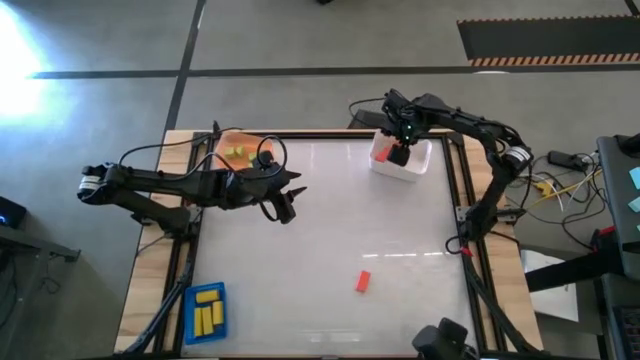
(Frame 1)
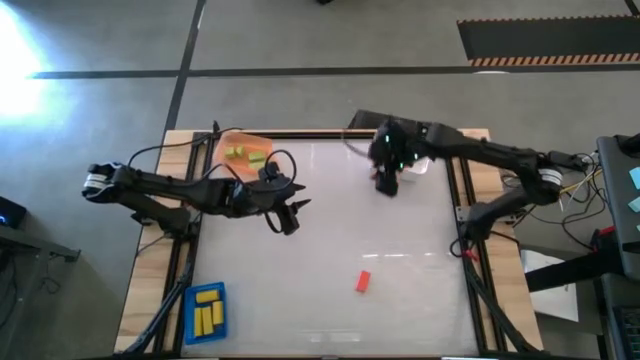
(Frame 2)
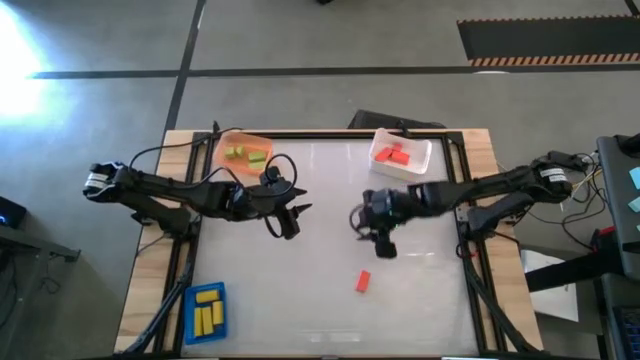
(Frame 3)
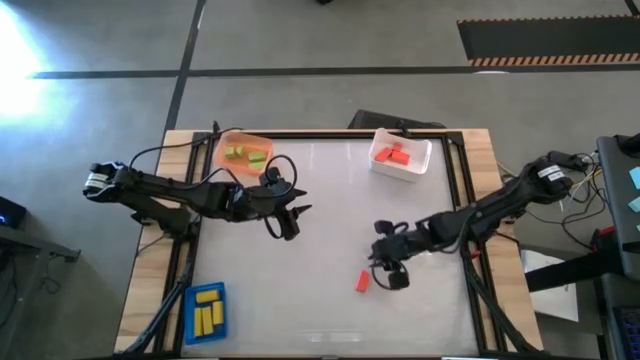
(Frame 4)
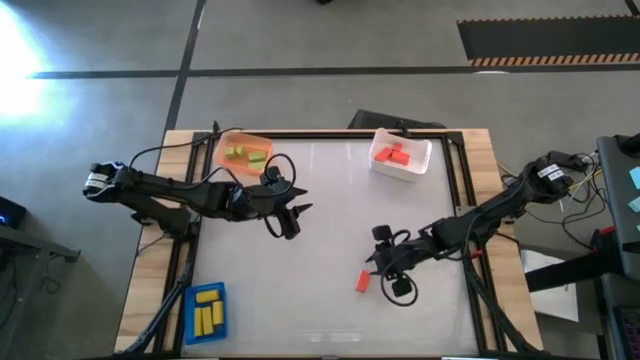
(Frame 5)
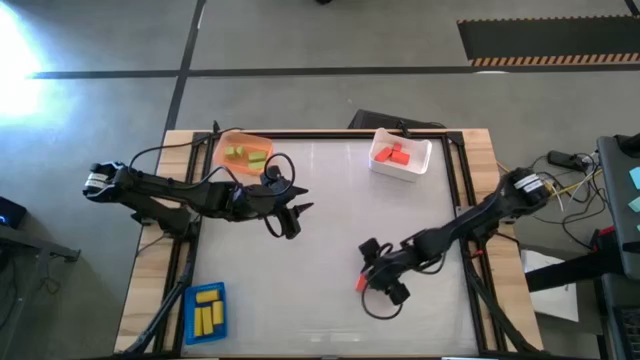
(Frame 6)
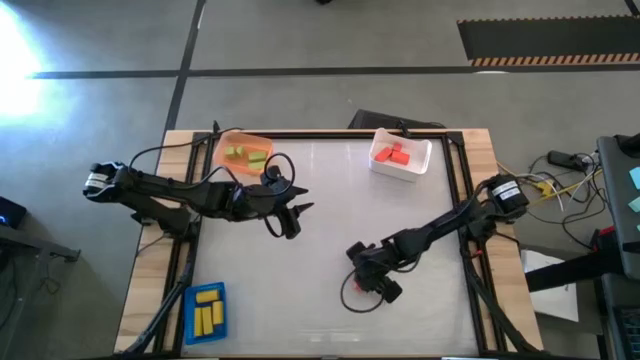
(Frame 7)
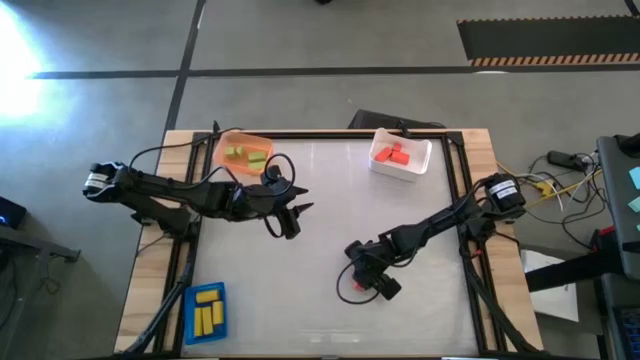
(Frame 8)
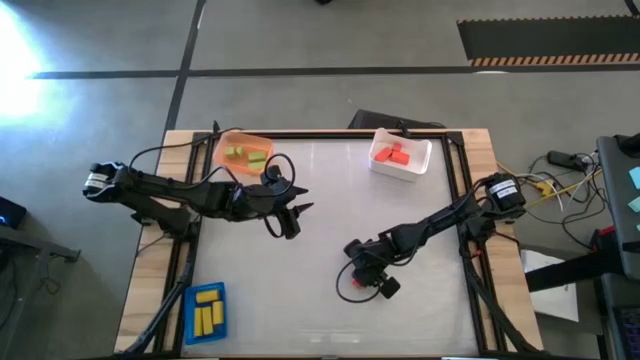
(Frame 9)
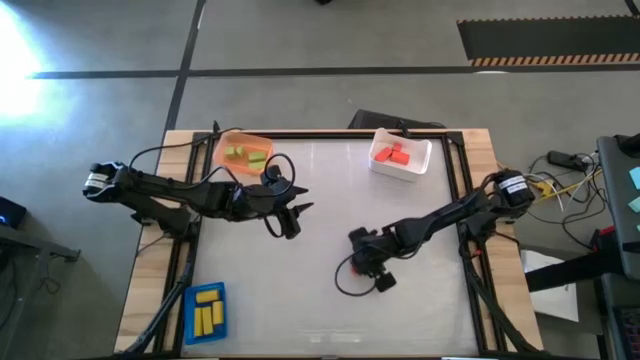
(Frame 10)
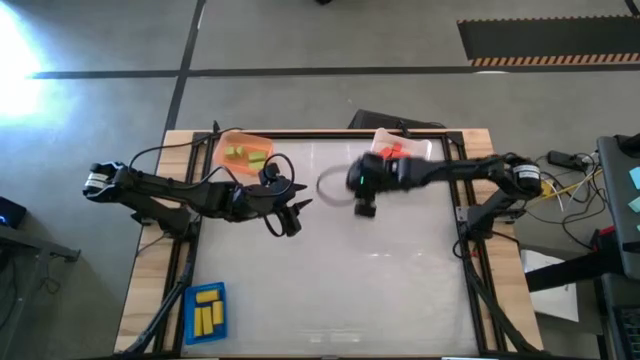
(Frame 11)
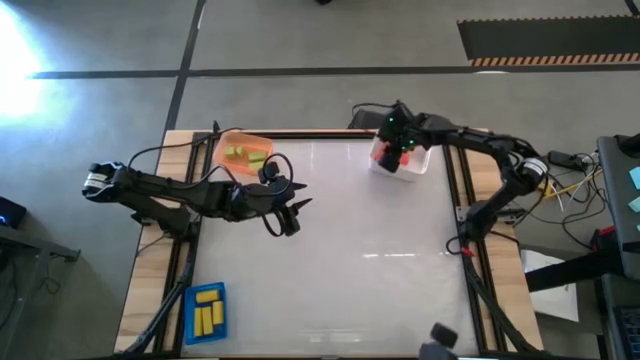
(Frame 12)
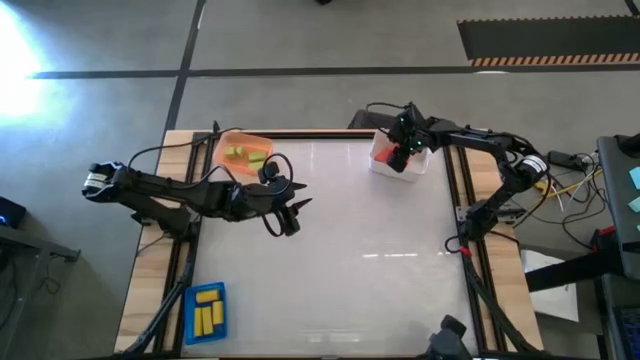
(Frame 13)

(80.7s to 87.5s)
Task: Sort & place blocks by color
Put the orange rectangular block into the white bin

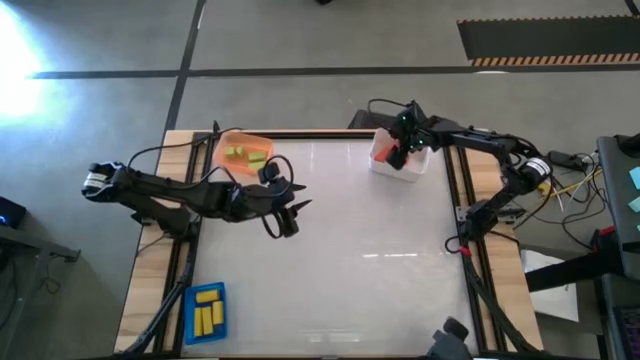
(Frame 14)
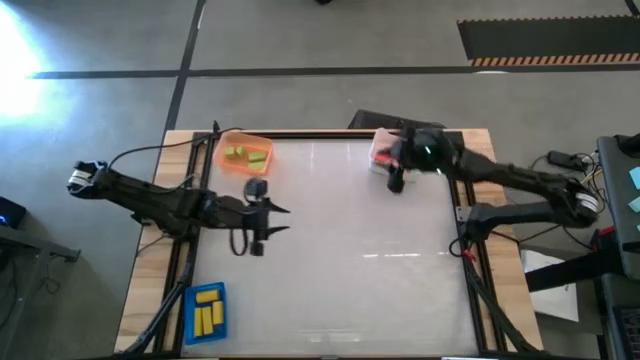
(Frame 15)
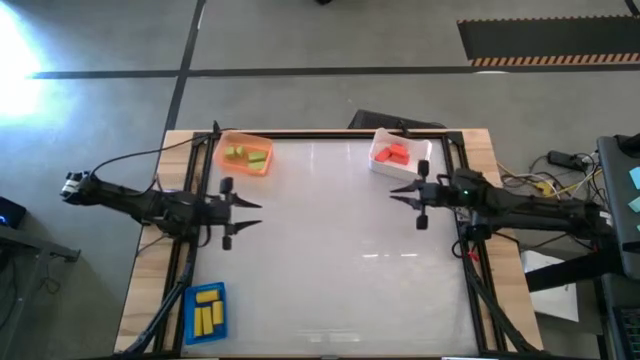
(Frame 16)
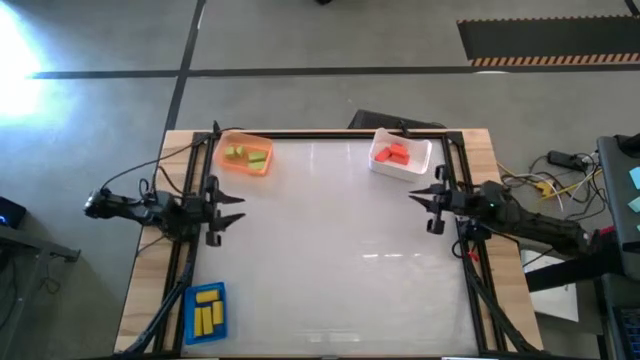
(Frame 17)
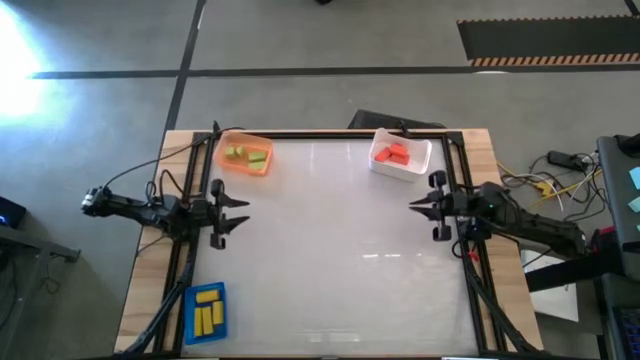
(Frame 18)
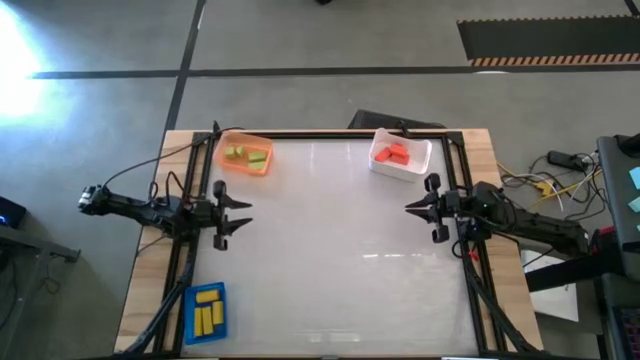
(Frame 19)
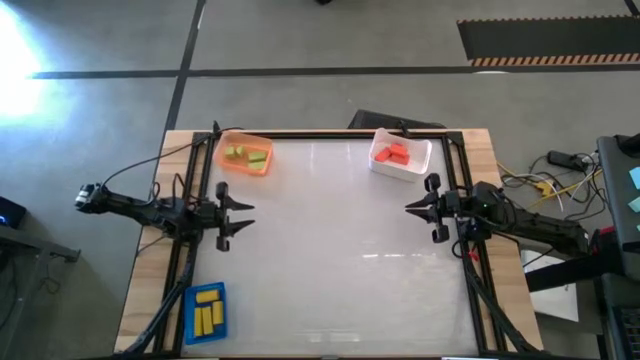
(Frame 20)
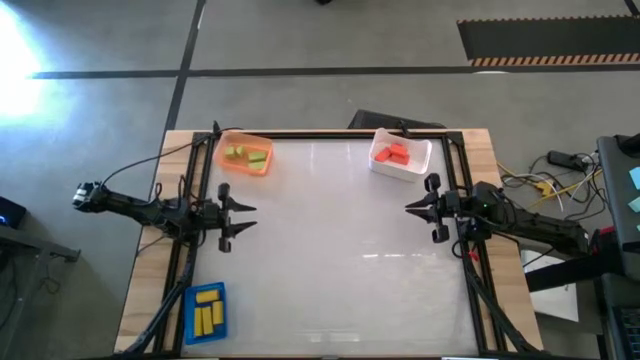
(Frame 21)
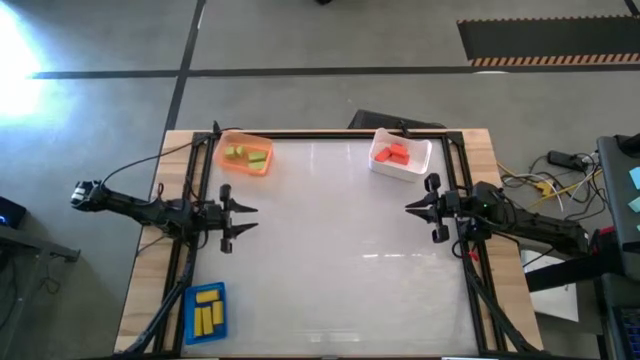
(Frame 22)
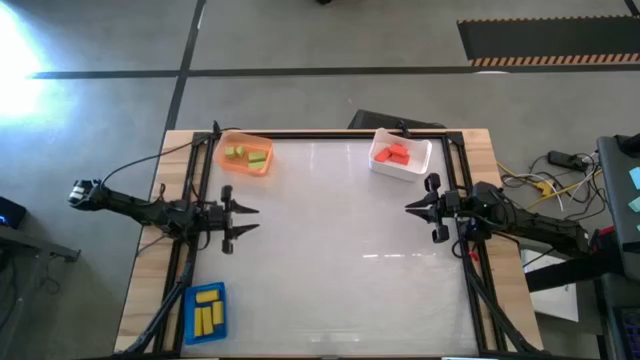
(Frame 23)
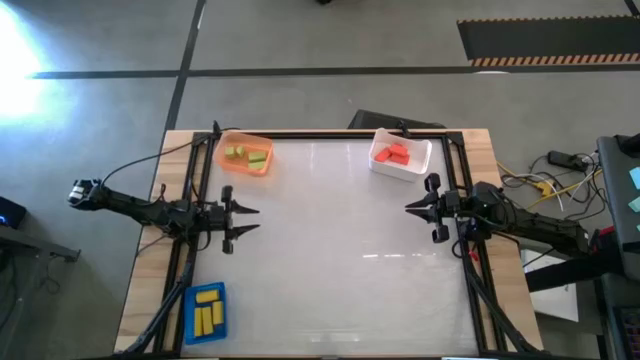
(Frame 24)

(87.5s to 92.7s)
Return to Home Position

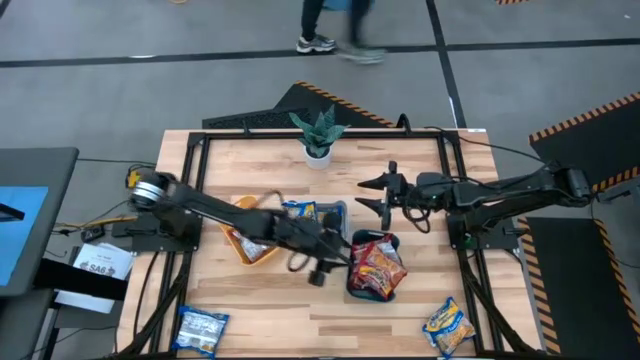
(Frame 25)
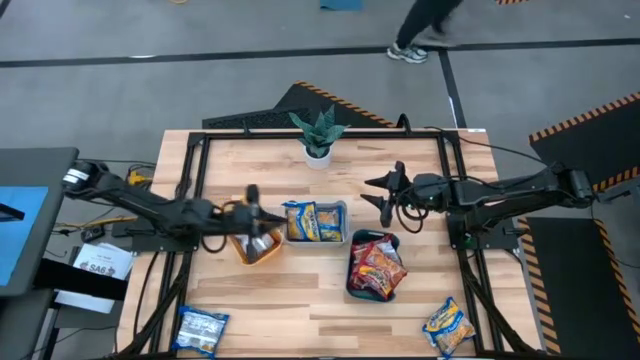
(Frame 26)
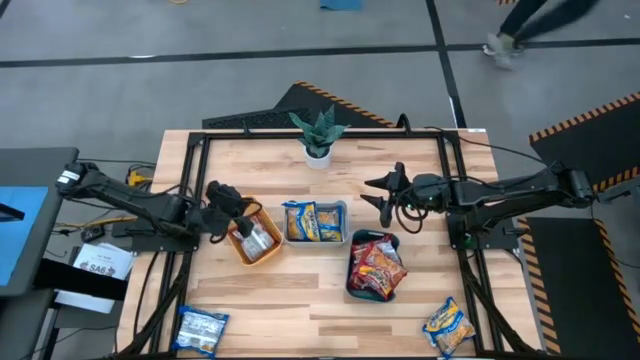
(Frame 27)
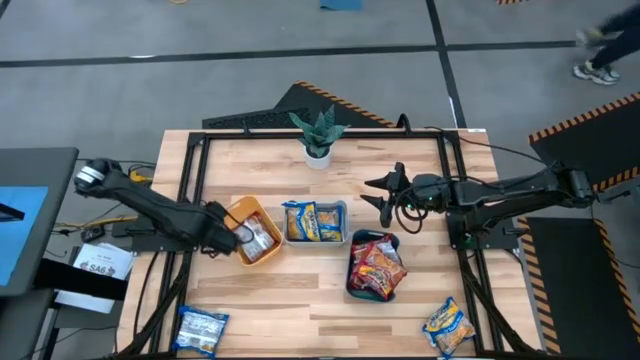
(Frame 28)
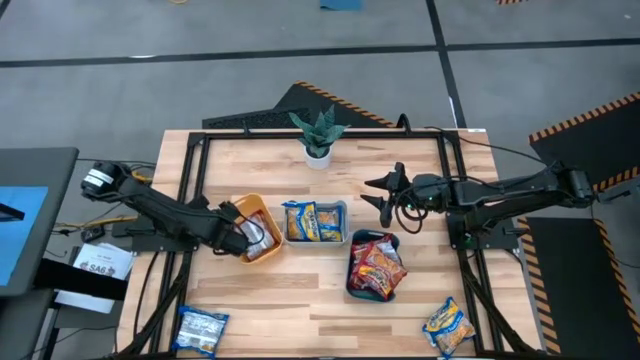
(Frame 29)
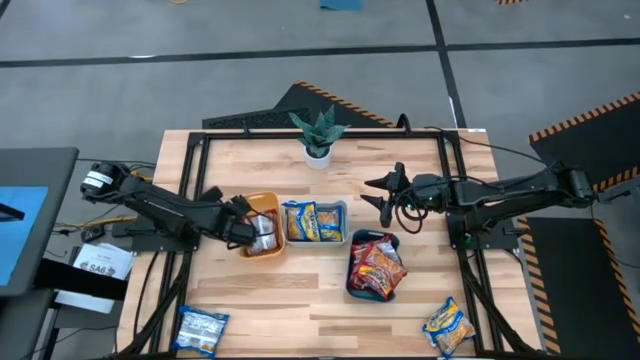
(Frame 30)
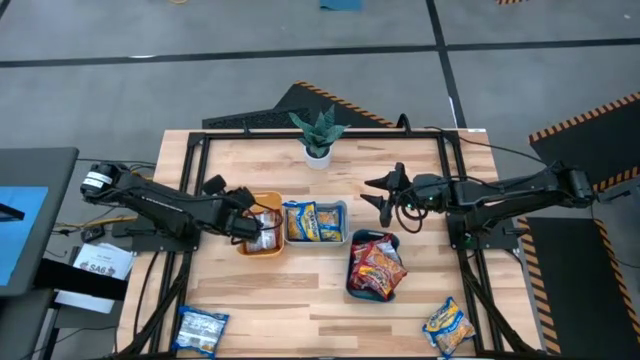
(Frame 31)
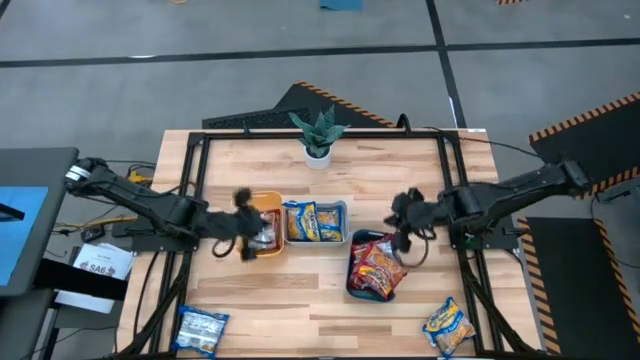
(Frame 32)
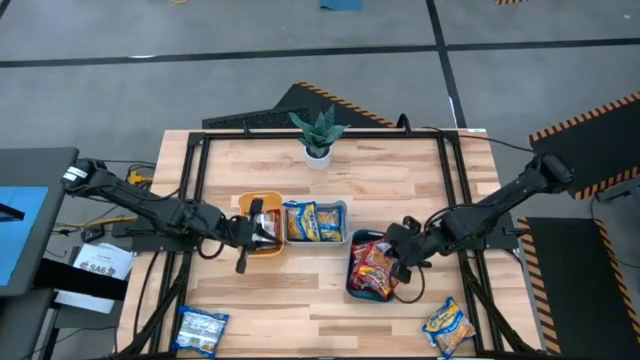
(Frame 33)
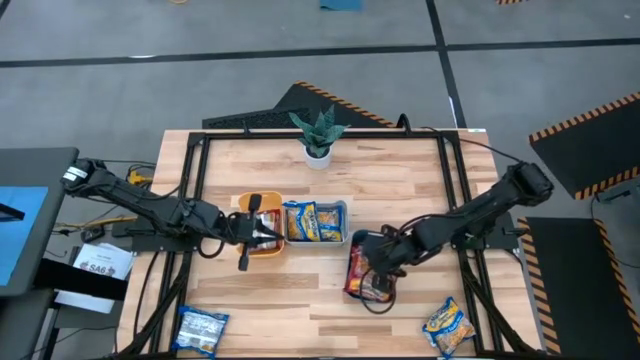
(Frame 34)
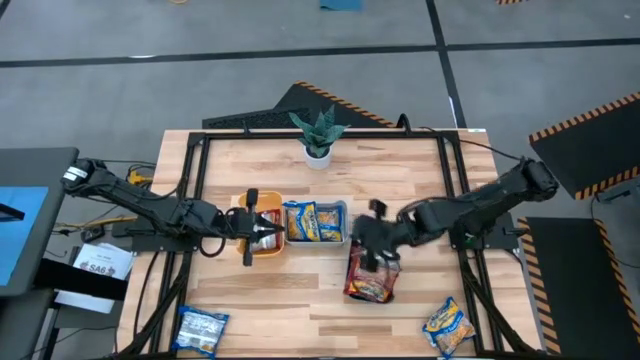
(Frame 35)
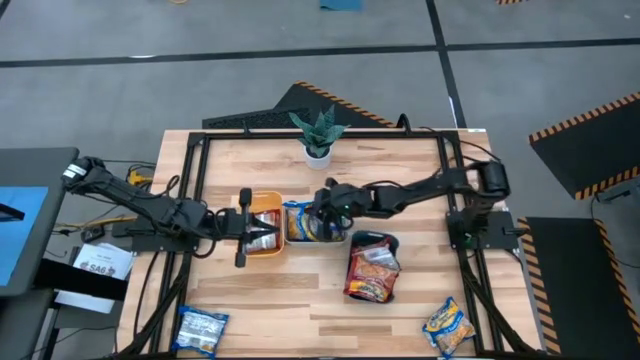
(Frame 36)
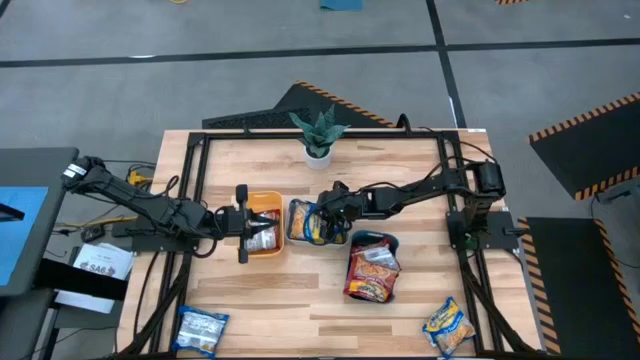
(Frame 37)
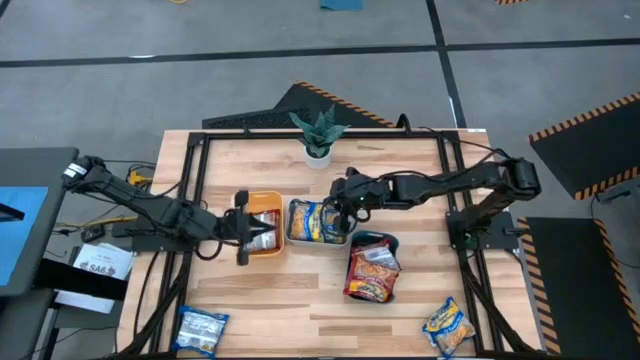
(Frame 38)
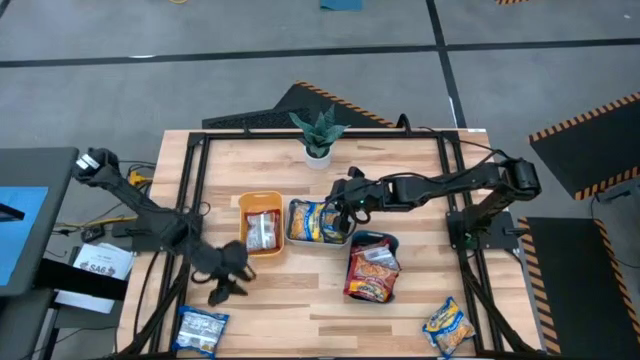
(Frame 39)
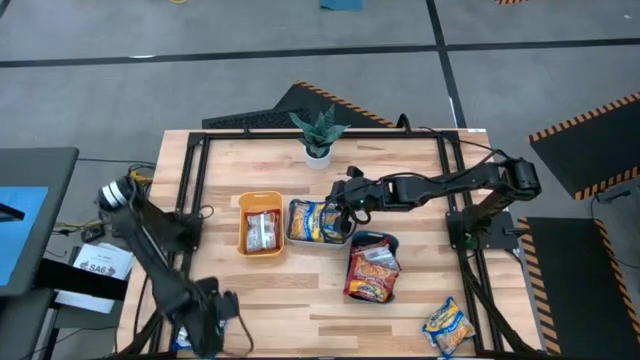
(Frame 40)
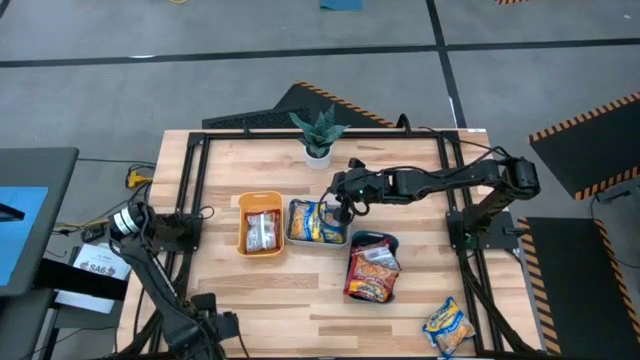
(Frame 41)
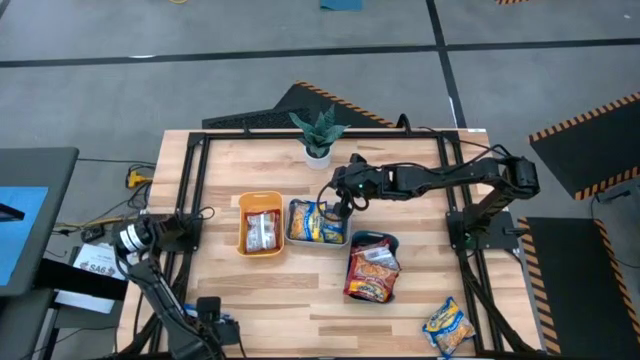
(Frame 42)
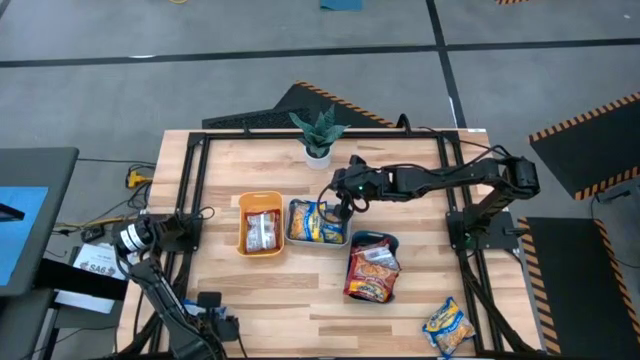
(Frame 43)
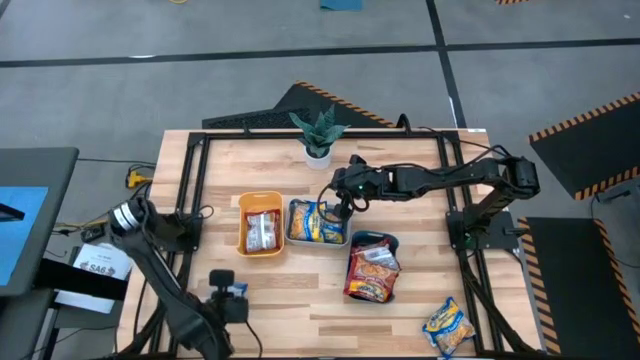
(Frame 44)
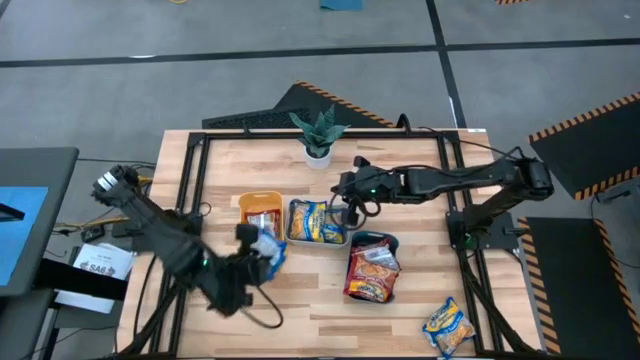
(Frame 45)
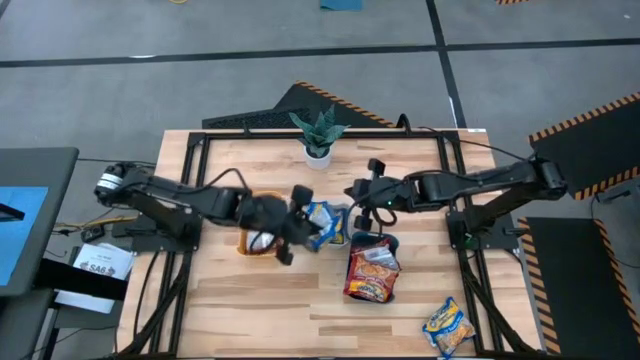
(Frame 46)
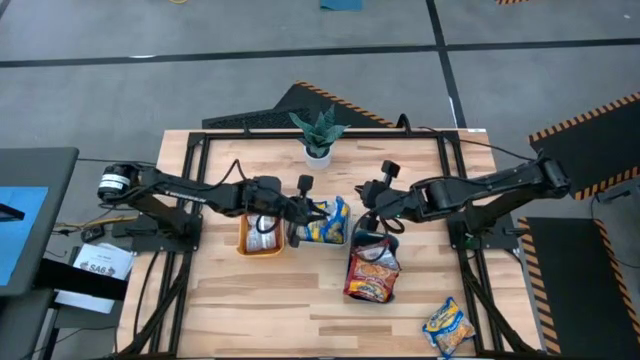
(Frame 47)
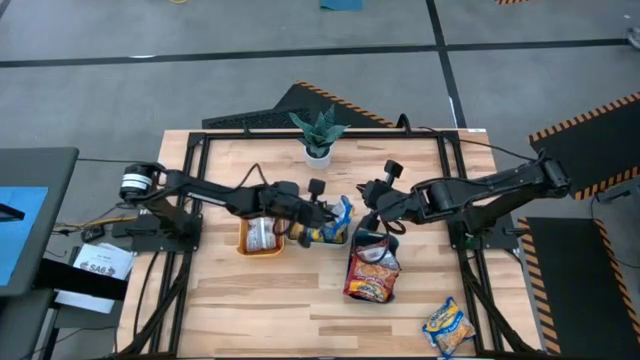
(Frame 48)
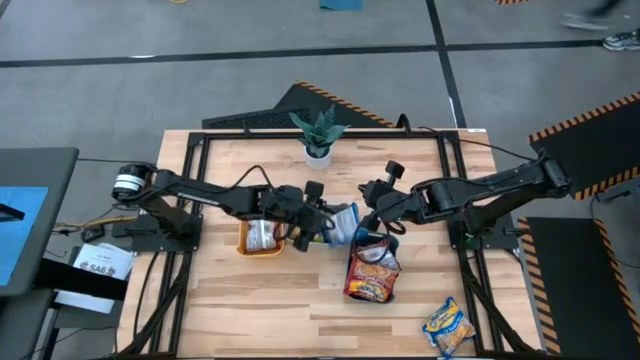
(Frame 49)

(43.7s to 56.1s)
Task: Sort Maruchan noodles
Put the left blue noodle pack into the gray bin
